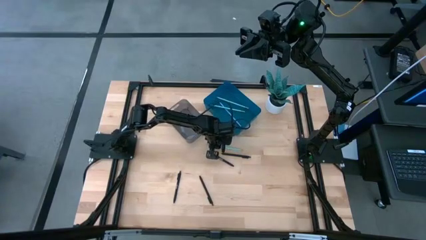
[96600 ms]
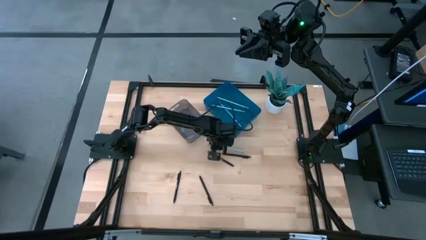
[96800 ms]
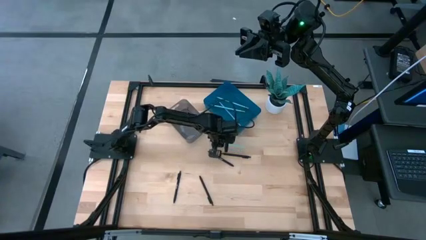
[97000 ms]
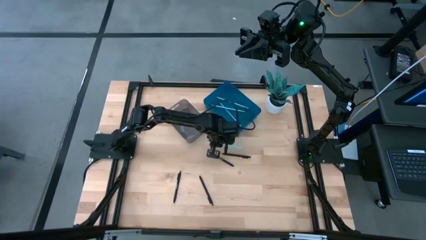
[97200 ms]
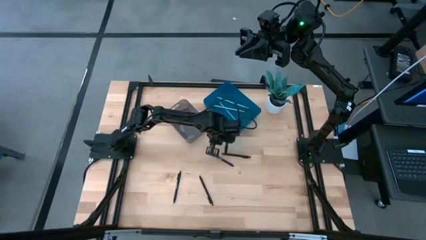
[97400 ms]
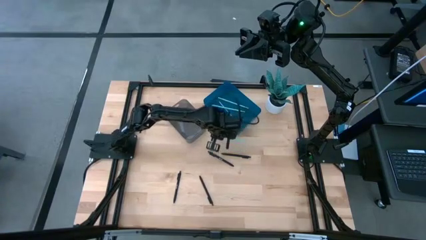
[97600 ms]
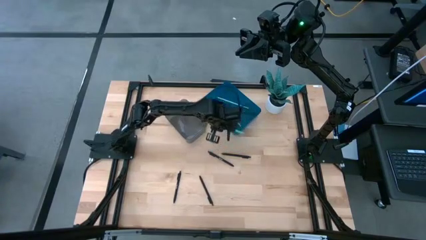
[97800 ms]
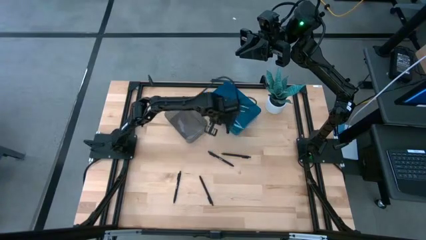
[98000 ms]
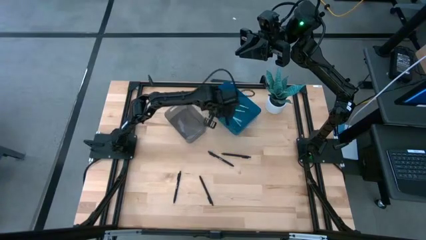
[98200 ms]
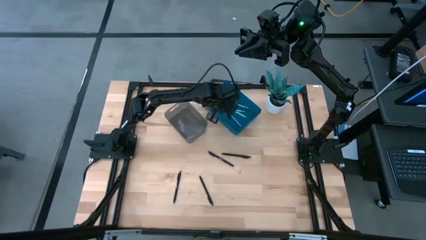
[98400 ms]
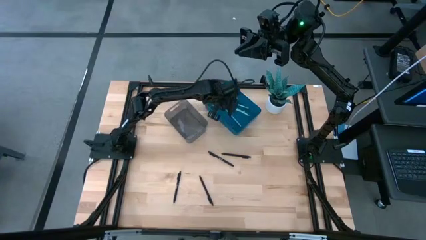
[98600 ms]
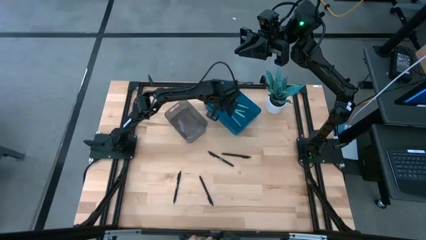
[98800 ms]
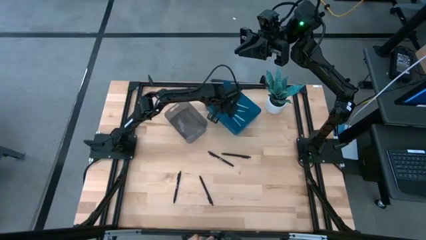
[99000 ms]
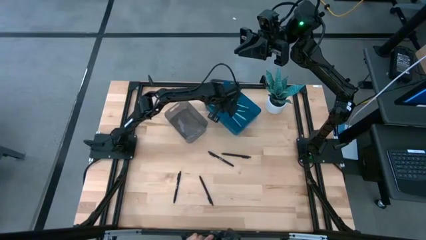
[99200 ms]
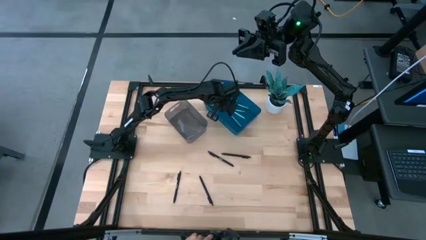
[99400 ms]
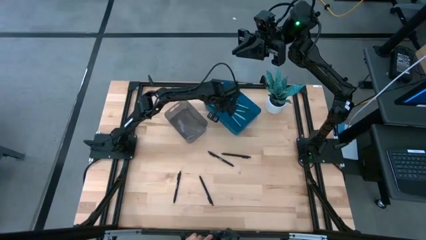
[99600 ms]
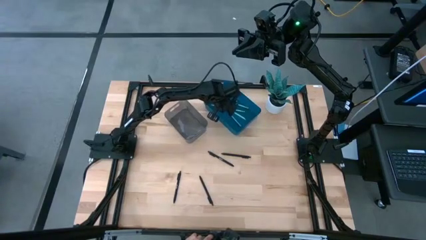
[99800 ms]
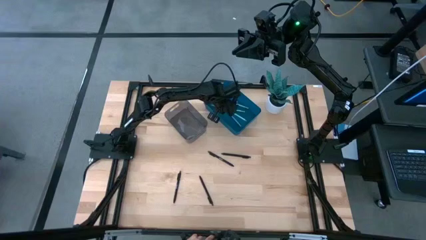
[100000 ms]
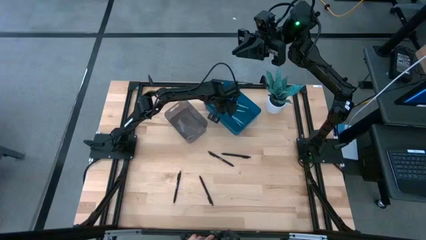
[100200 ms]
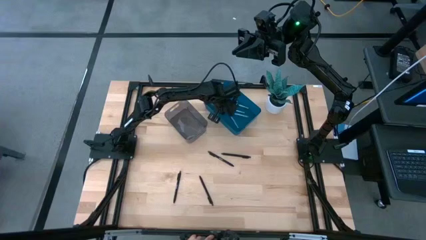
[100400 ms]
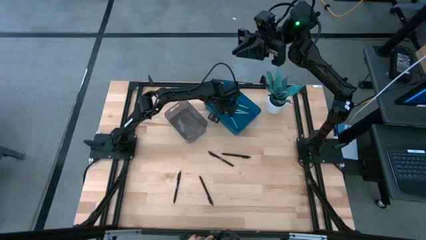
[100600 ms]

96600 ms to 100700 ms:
Task: Sort pens & pencils
Put the light blue pencil into the blue bin

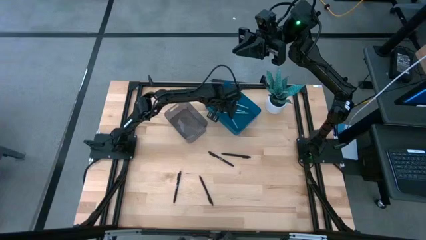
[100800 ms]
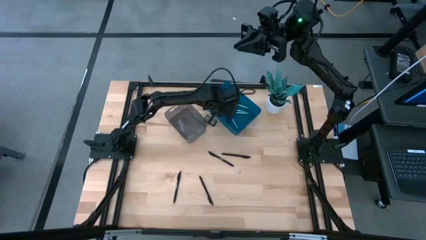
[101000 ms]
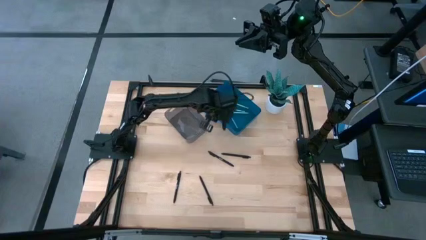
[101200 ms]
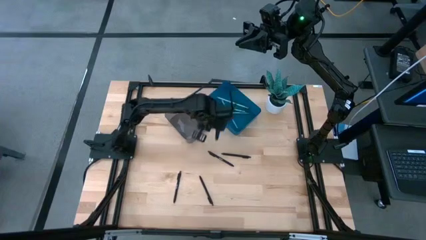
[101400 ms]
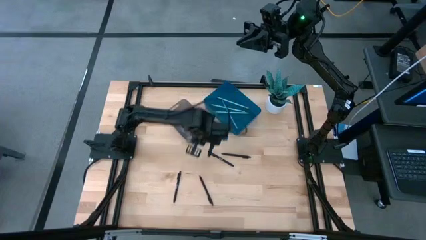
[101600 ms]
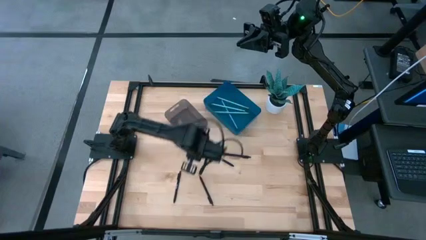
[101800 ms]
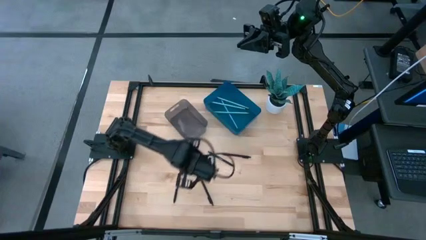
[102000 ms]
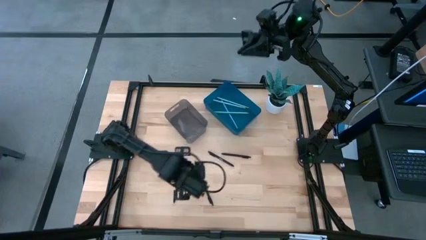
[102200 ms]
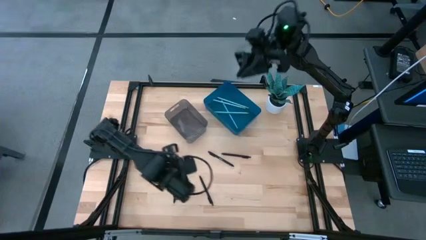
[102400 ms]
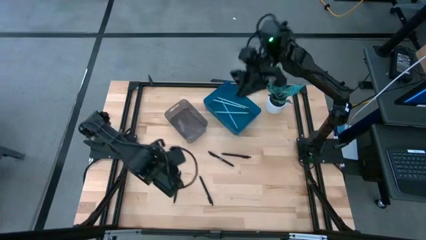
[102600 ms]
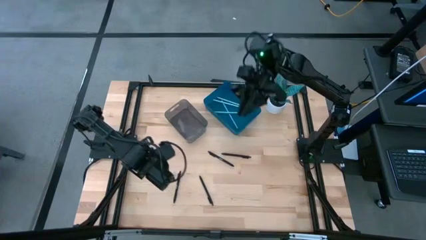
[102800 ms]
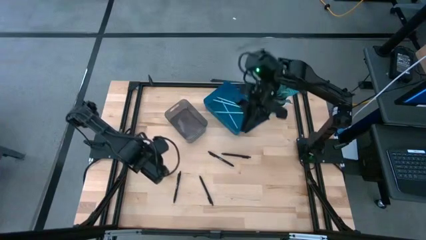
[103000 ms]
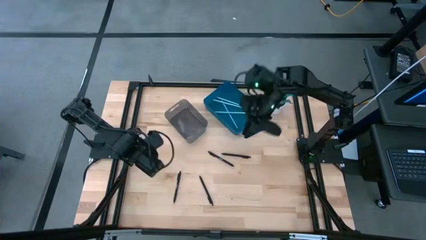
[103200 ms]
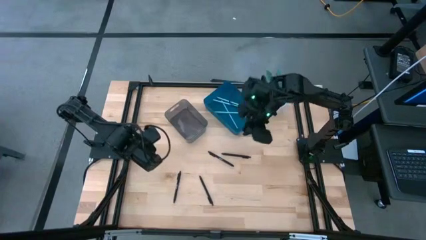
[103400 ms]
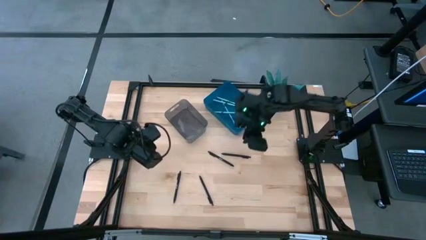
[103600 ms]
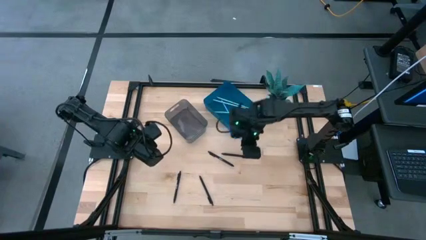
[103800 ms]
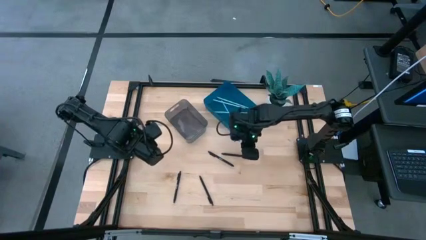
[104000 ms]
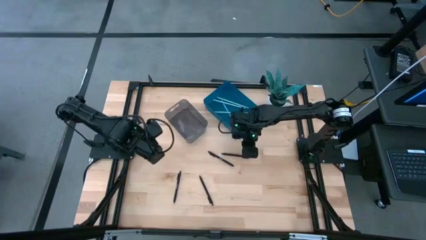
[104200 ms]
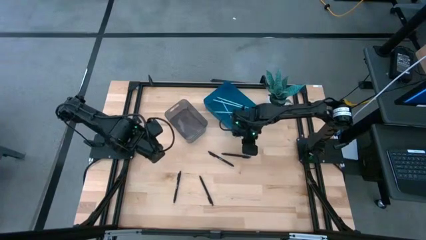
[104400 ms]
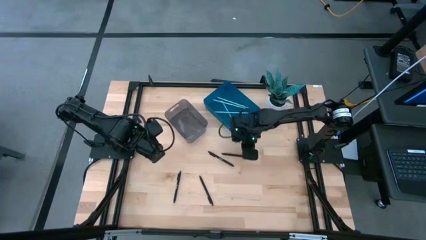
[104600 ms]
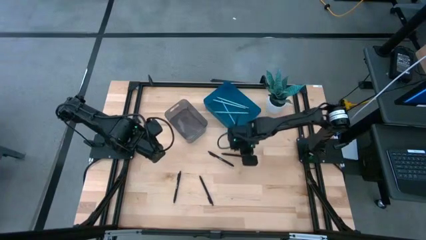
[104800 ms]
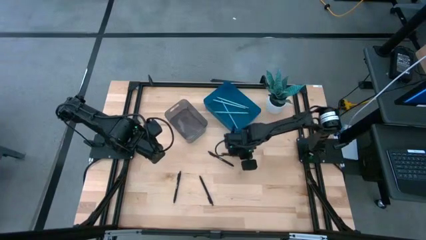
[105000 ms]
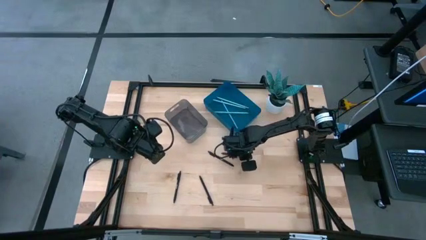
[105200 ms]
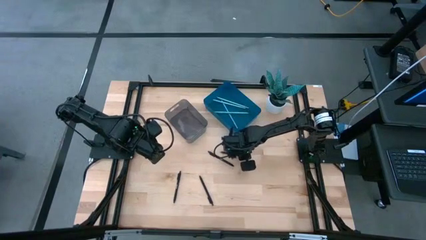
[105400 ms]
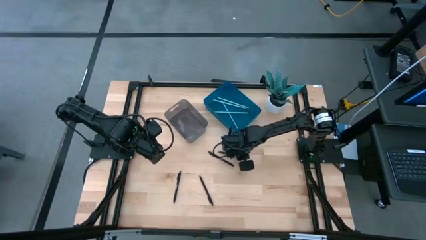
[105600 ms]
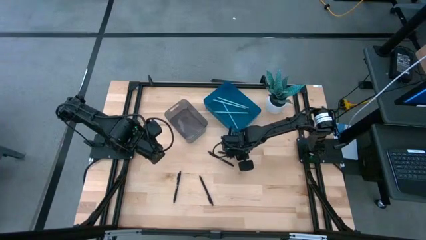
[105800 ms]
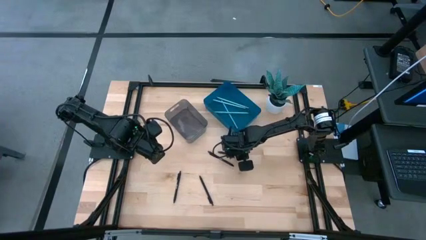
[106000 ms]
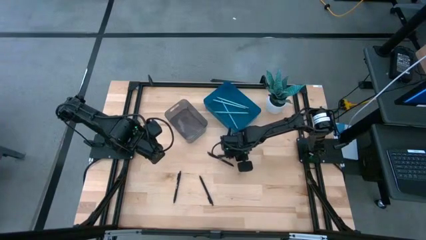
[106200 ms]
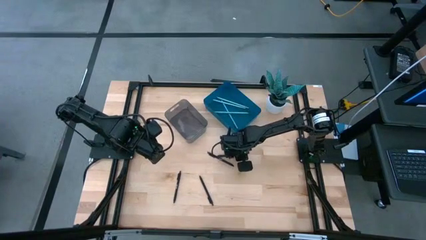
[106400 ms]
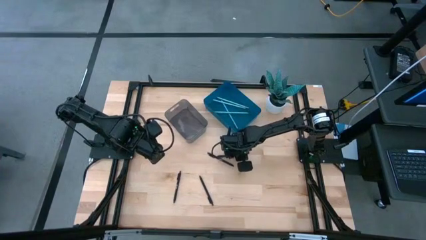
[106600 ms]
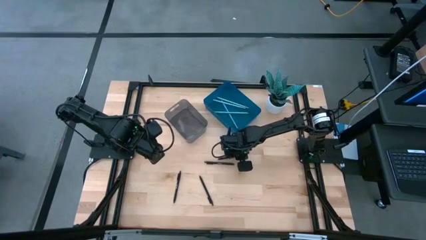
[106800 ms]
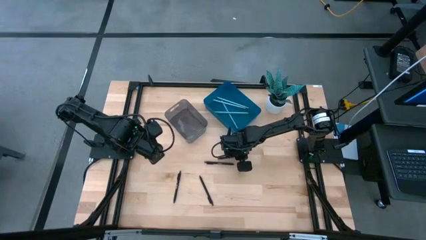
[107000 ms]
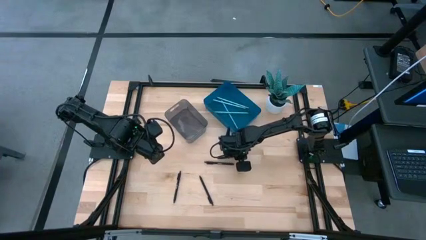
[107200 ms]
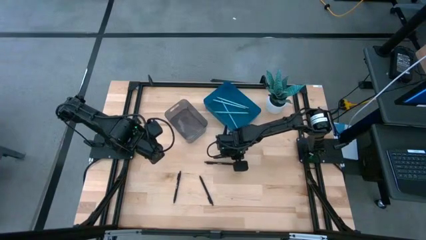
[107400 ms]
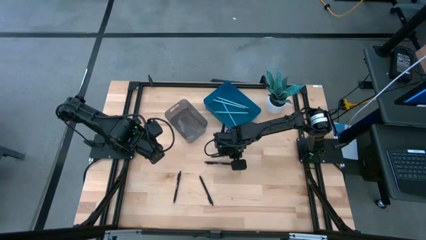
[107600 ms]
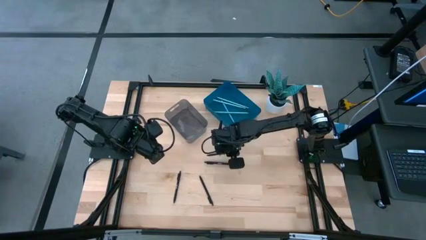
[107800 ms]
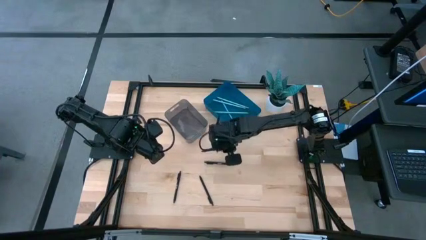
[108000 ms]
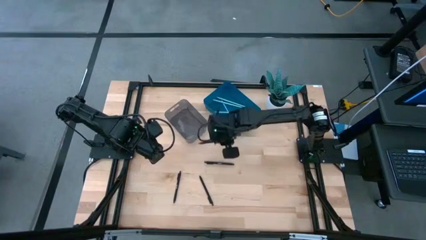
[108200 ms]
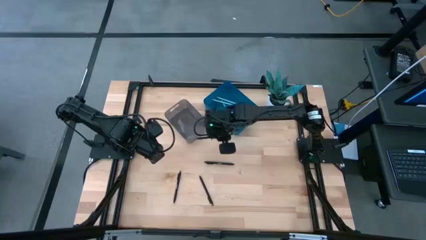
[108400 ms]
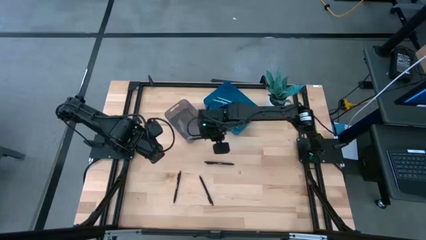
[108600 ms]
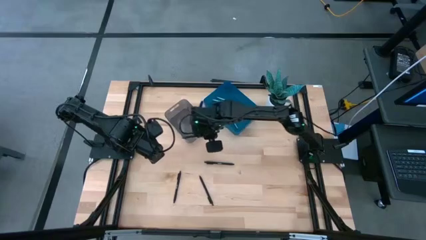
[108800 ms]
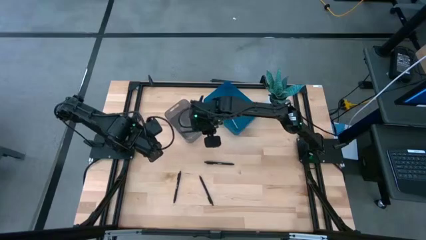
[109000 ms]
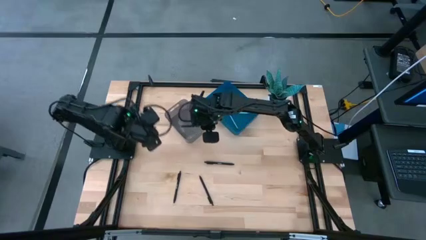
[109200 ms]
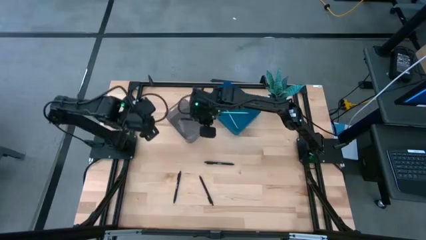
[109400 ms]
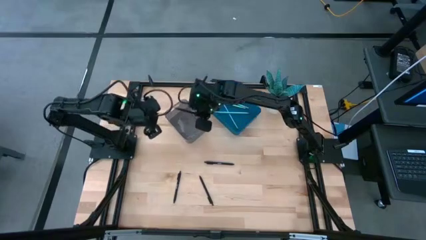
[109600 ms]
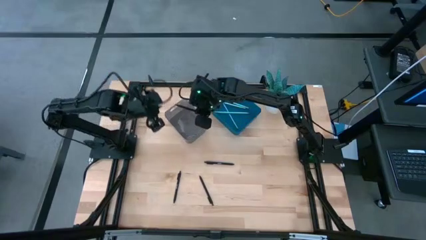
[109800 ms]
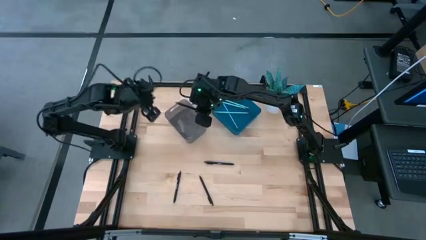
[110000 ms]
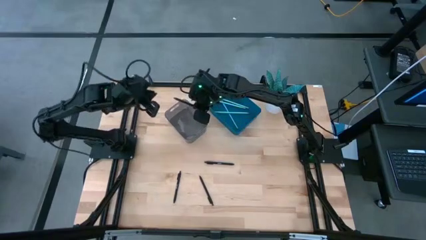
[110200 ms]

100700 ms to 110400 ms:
Put the black pen into the black bin

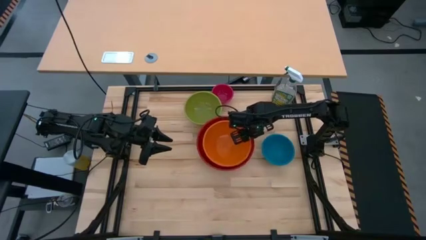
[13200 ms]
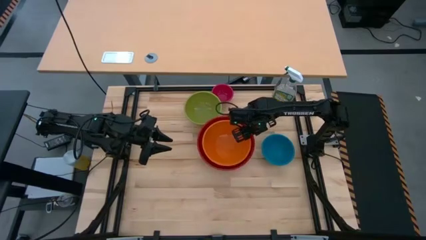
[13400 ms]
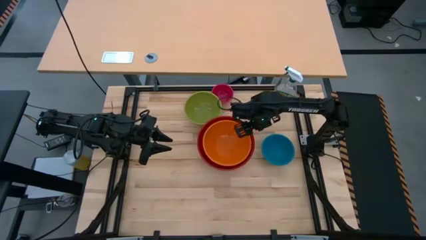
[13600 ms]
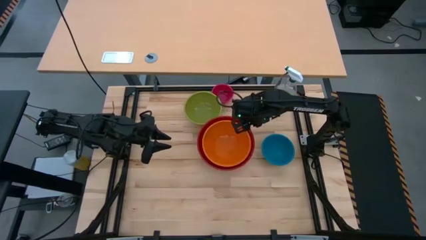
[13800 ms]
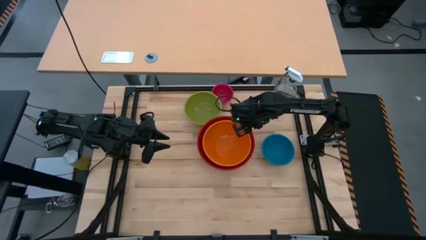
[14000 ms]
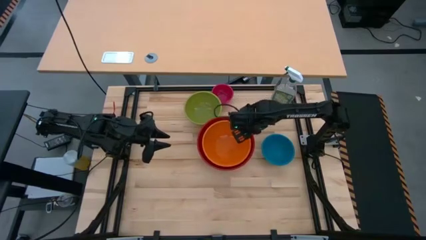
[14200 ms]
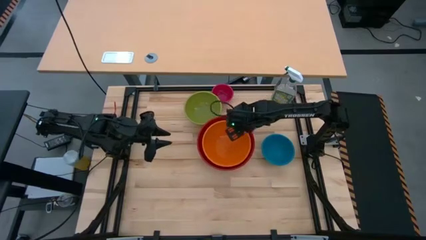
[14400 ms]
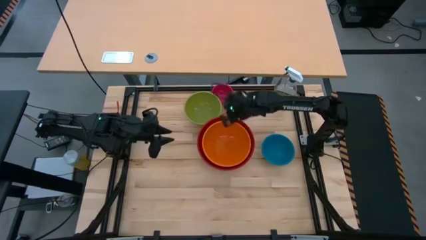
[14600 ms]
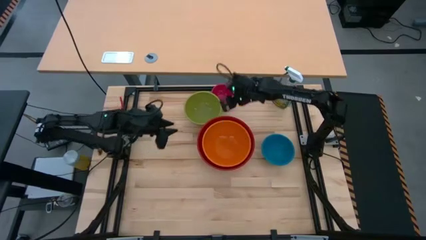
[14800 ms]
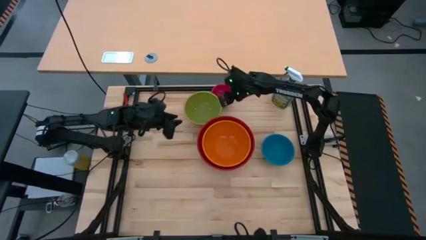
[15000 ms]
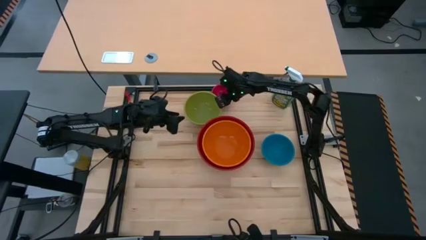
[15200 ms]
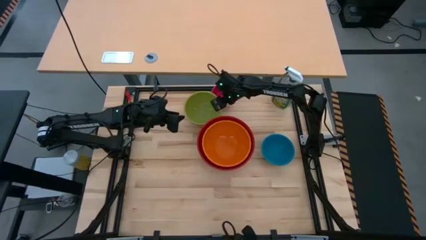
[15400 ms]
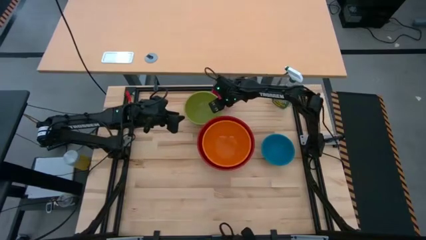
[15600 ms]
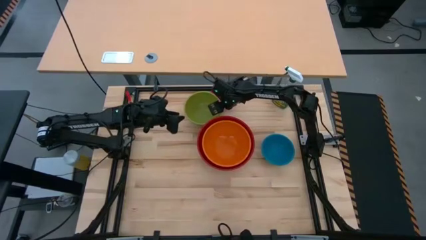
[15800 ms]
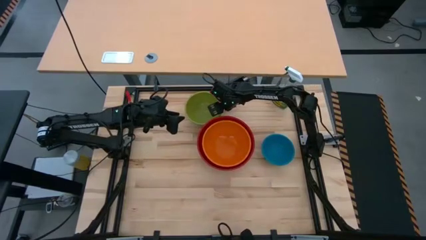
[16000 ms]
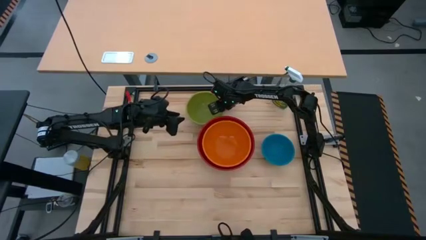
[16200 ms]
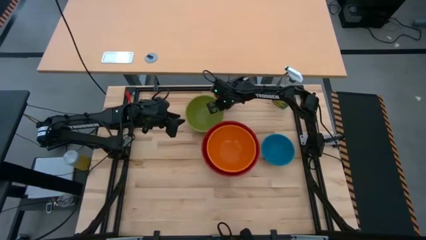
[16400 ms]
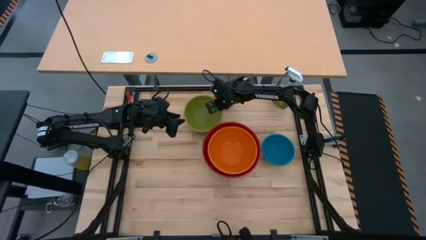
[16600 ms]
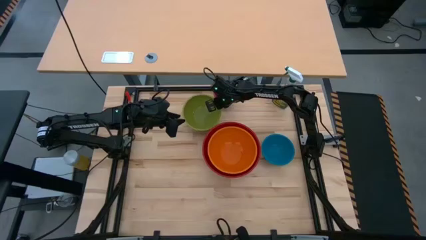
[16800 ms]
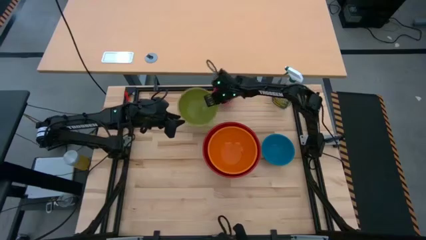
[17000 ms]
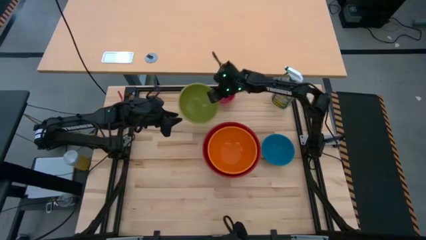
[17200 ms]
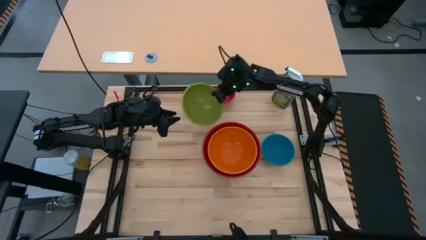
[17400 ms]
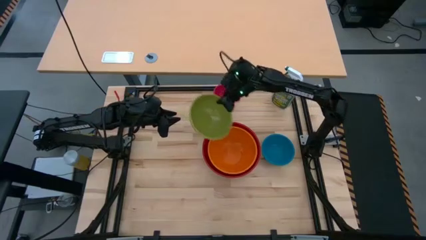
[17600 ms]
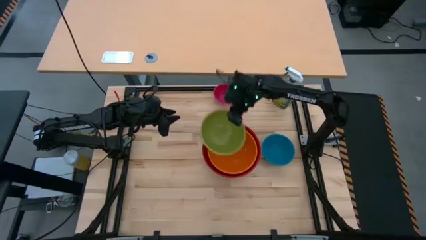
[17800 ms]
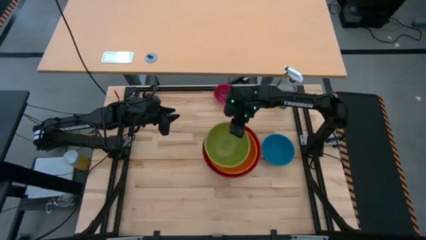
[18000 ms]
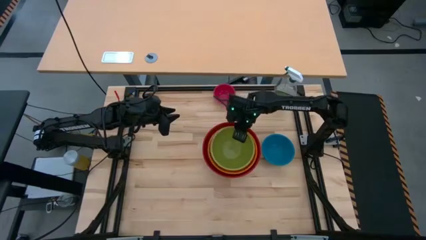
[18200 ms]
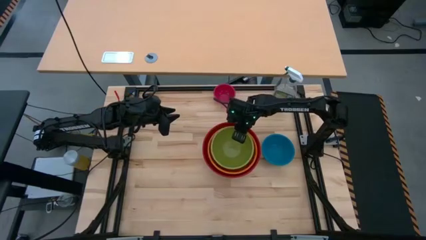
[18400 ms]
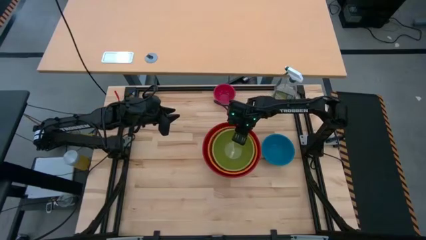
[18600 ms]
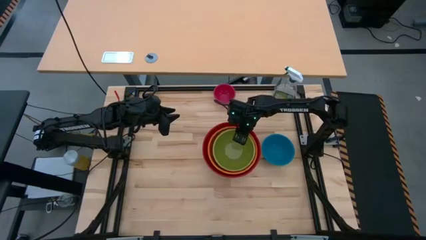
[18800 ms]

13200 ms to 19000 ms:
Task: Nest bowls inside each other by size order
Stack the green bowl on top of the orange bowl
